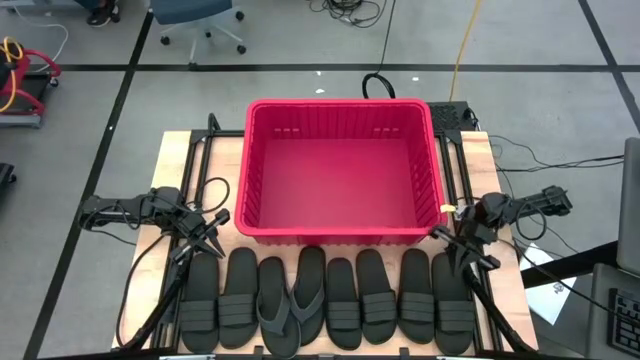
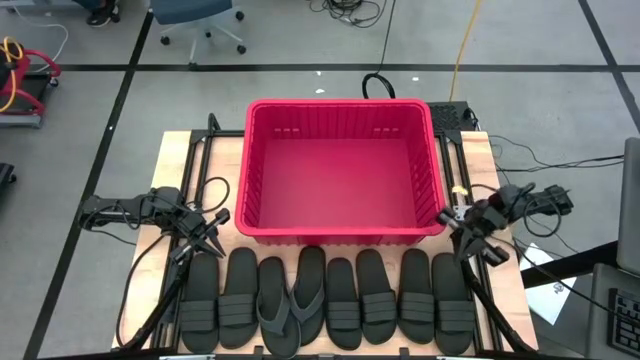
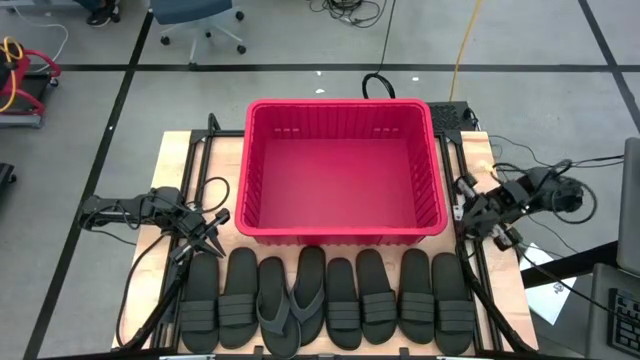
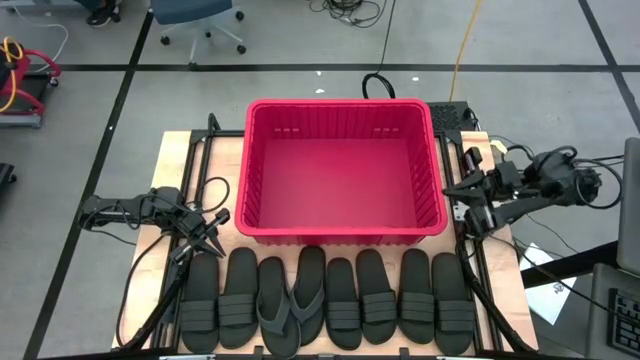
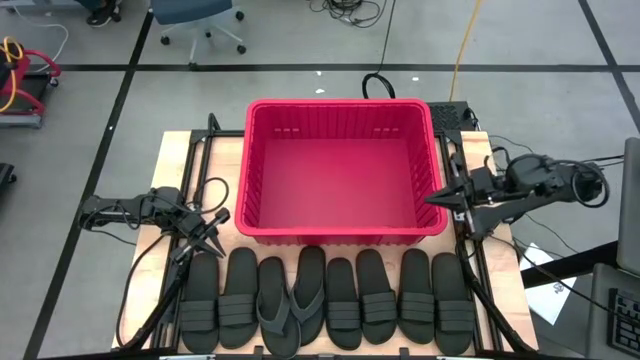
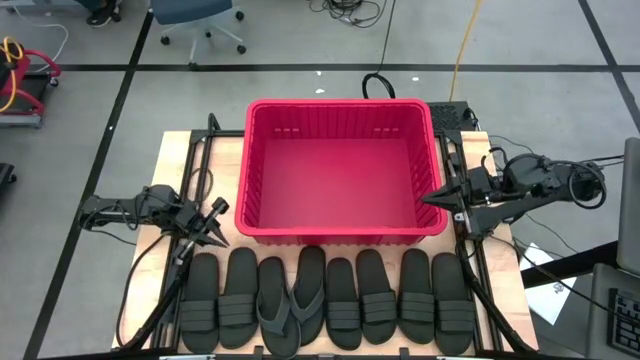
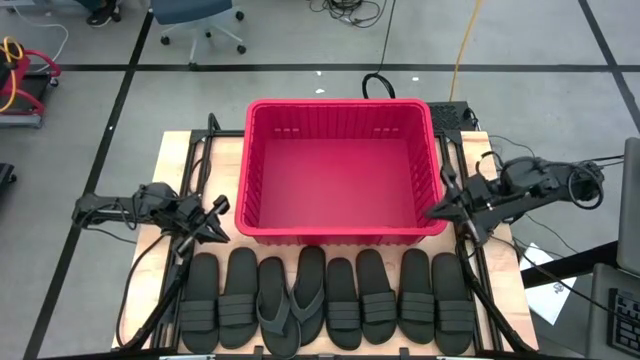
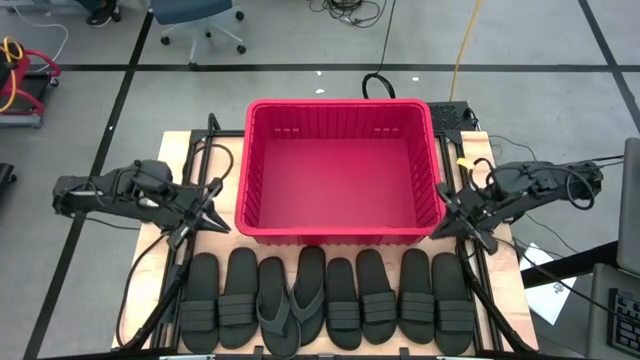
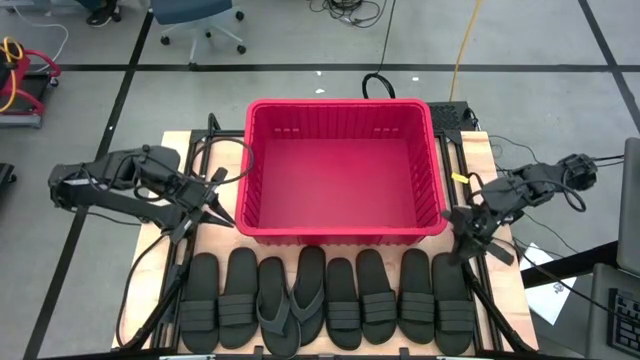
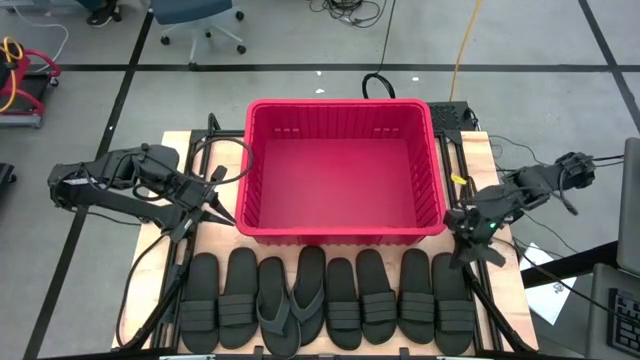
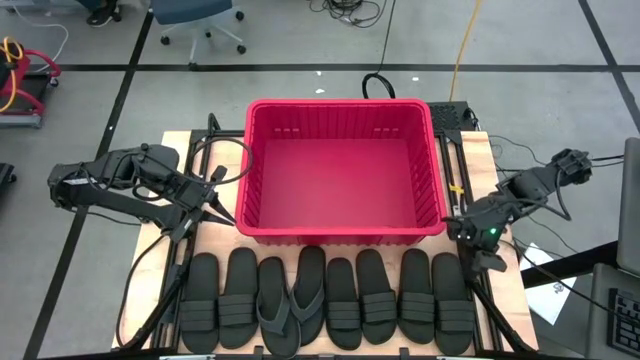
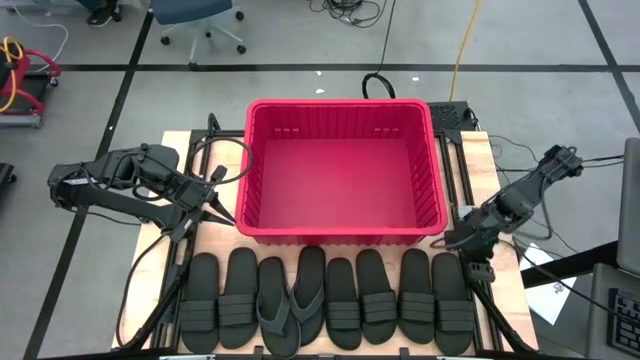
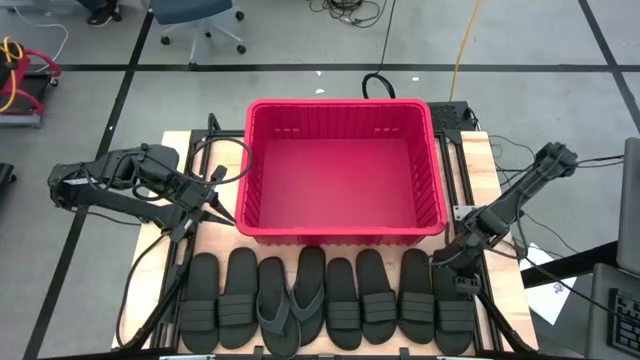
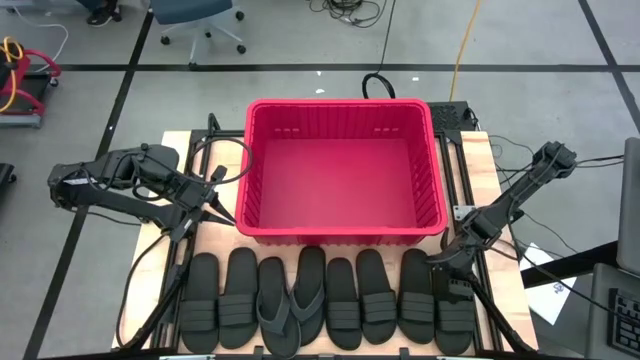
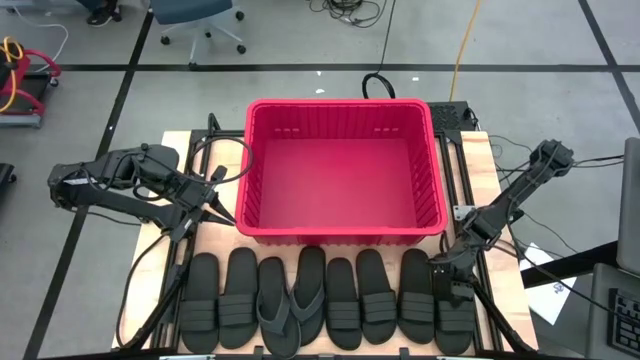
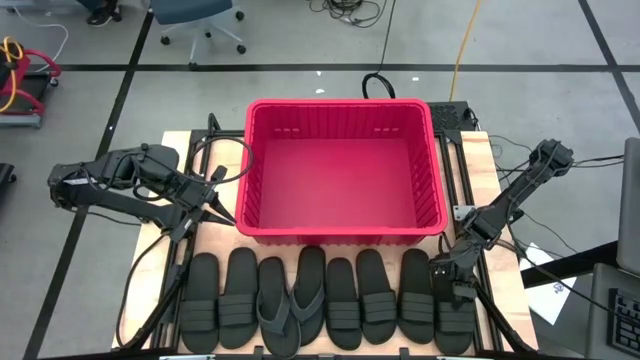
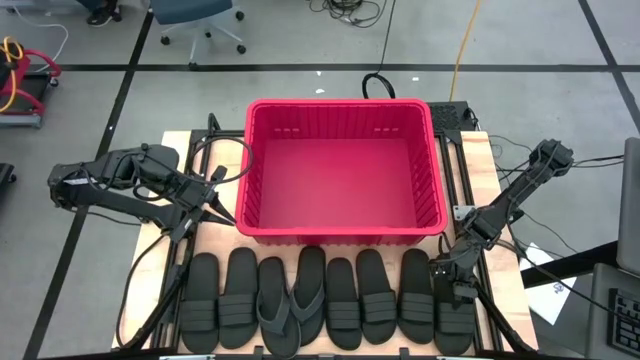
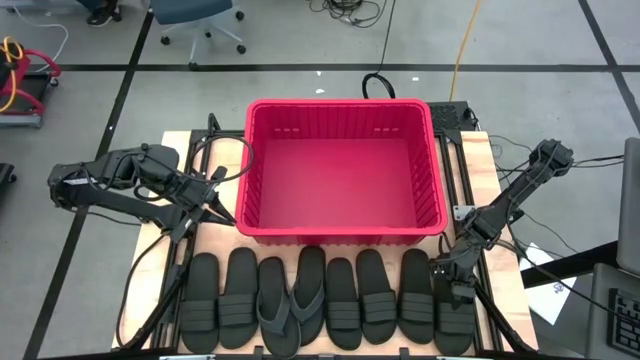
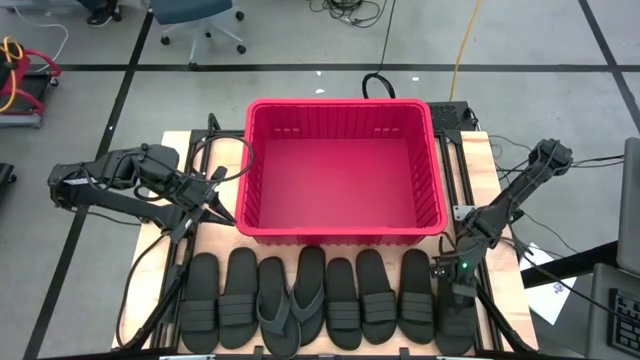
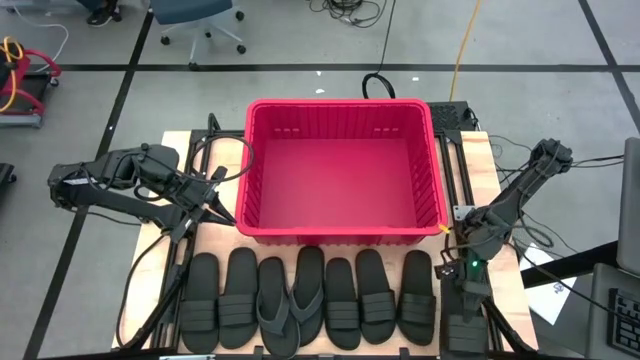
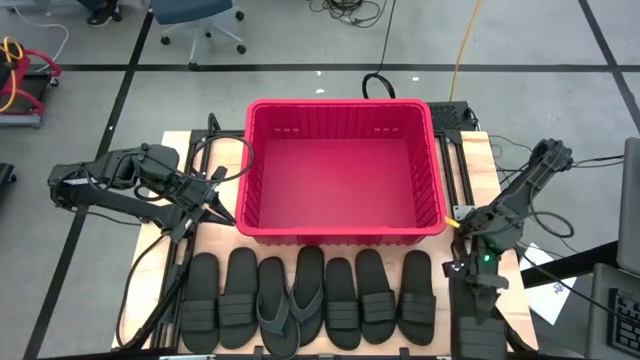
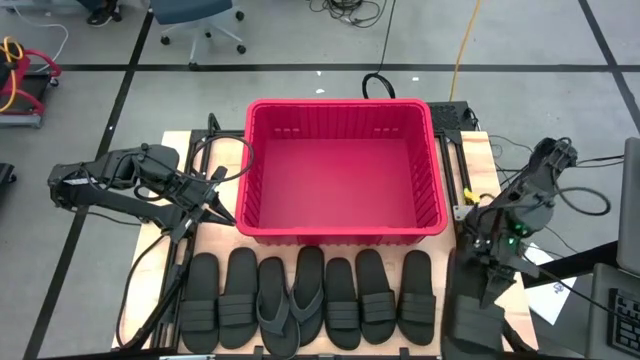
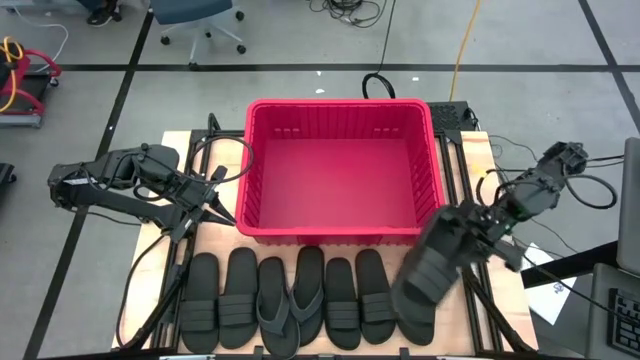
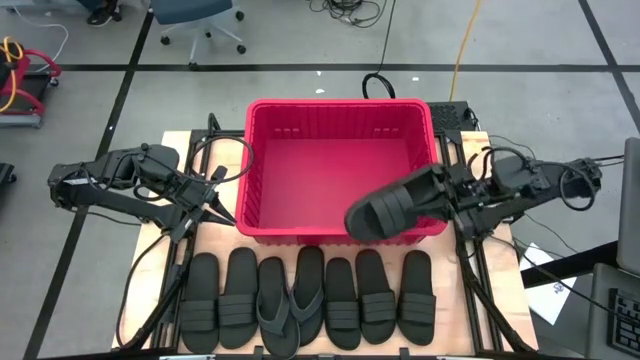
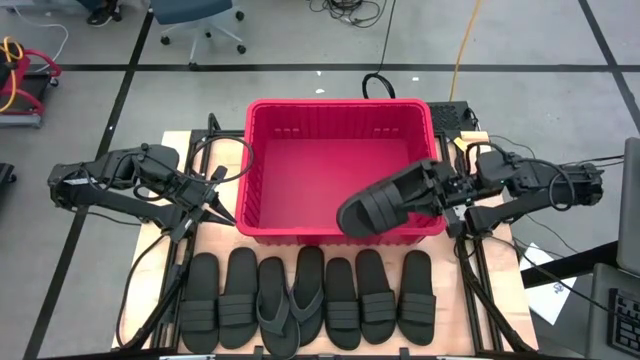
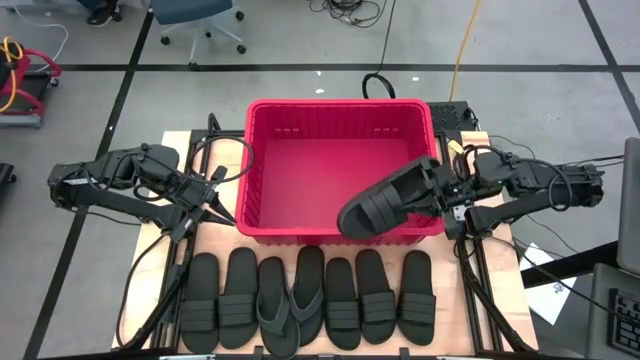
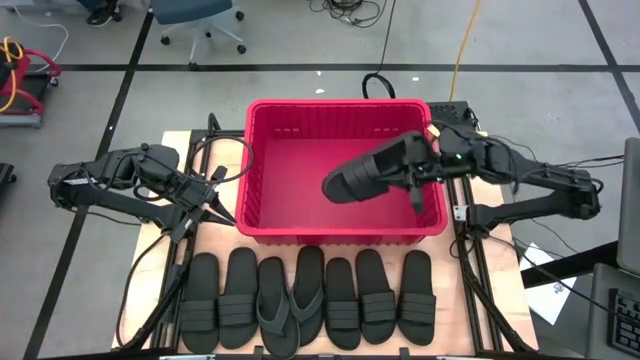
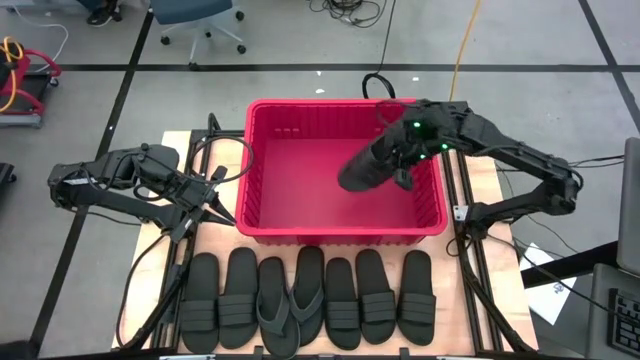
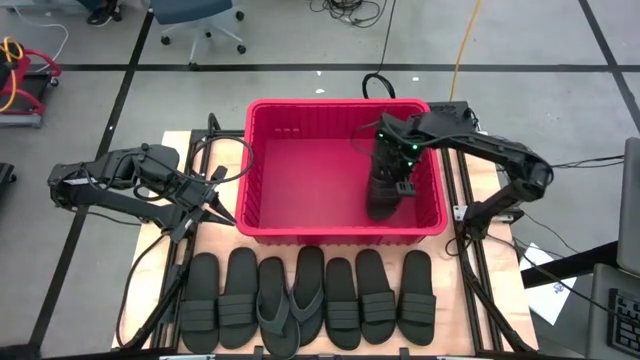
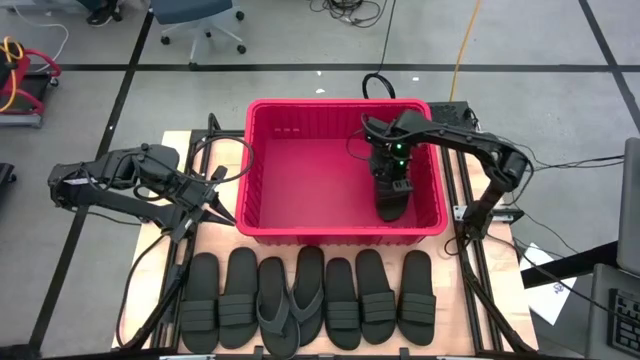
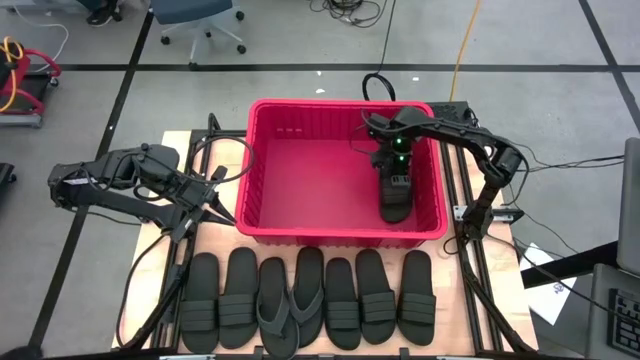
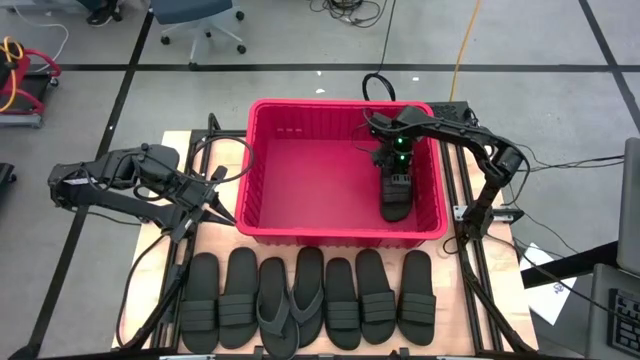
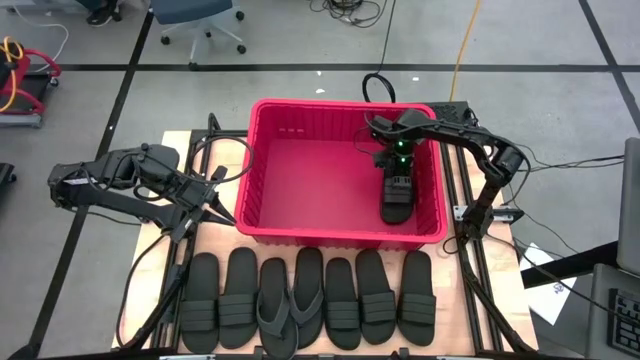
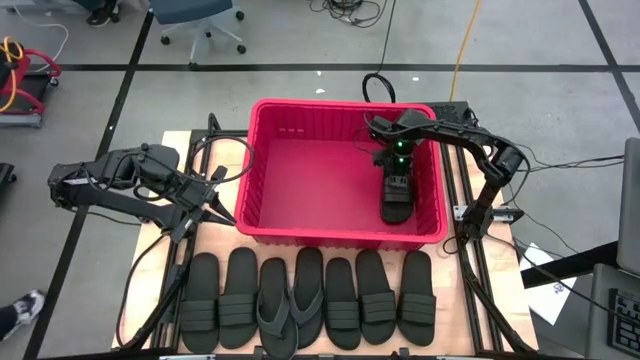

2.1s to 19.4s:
Task: Pick and place slides into bin
Put the black slide into the red bin

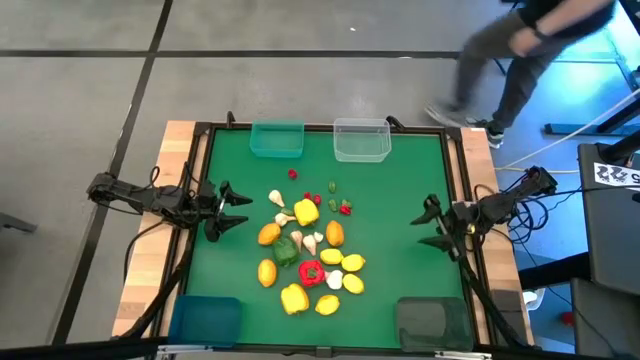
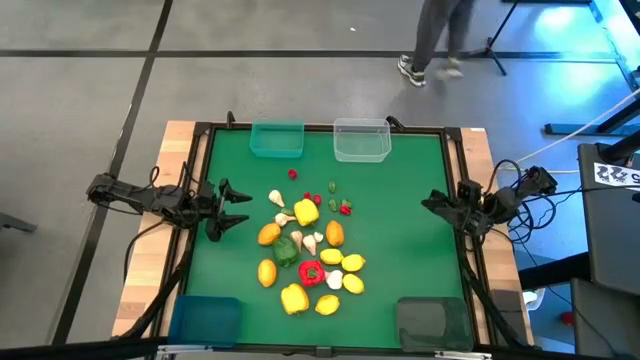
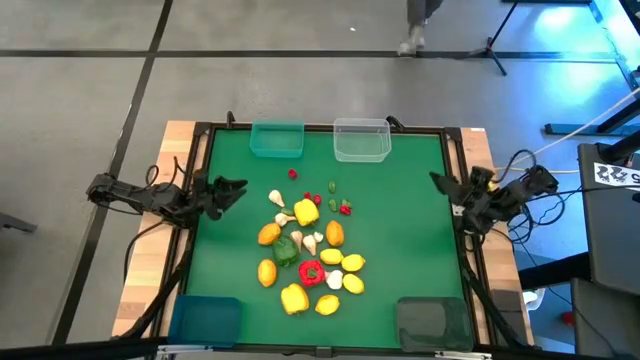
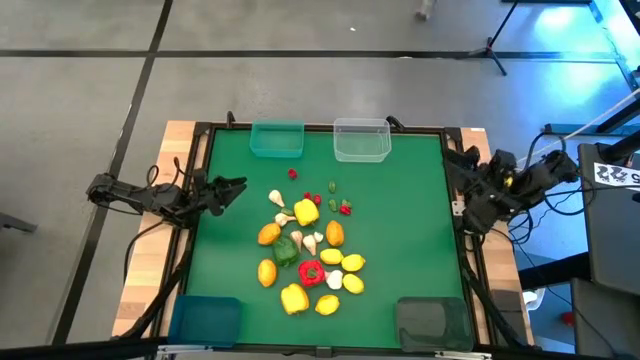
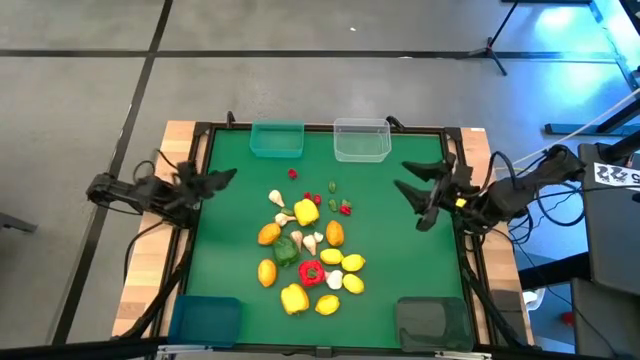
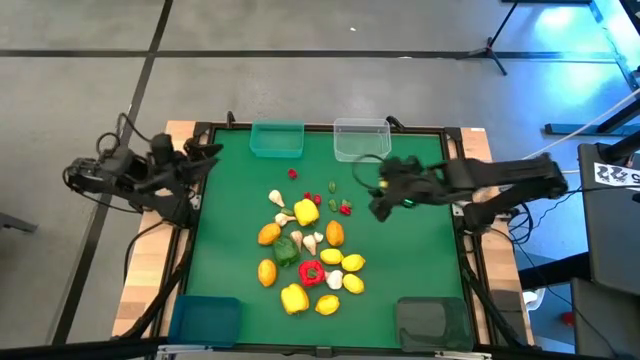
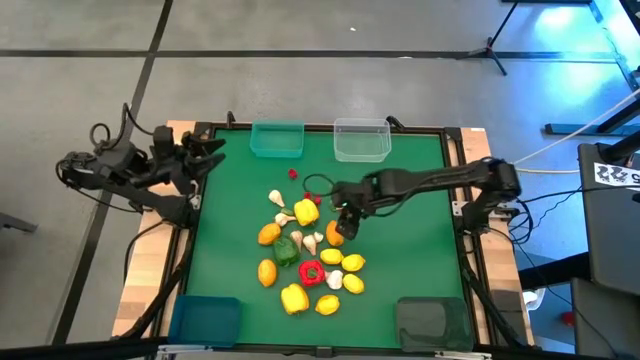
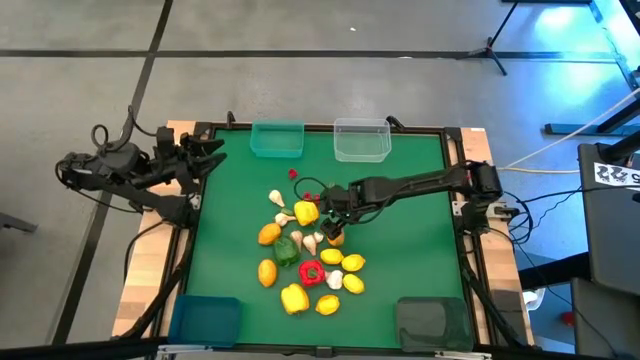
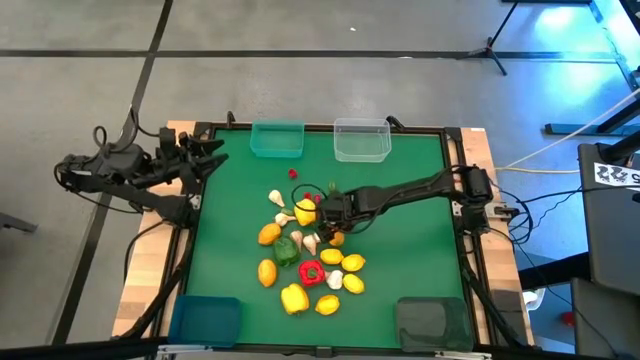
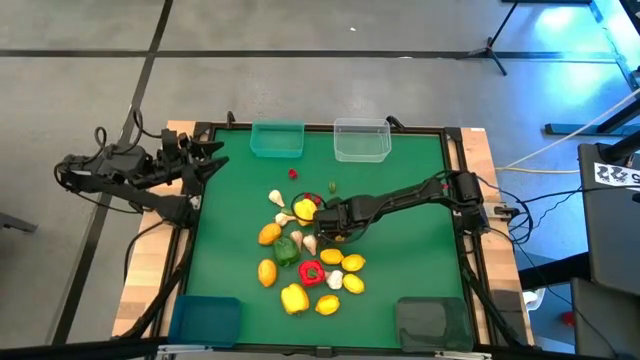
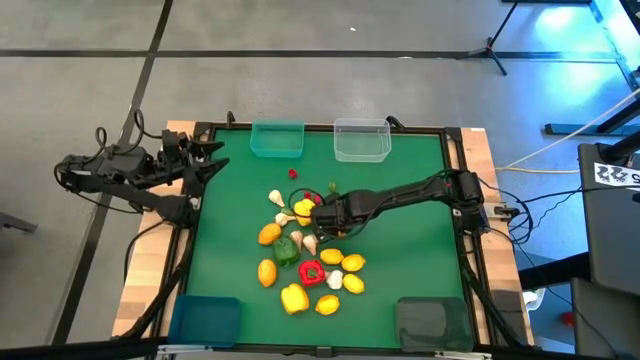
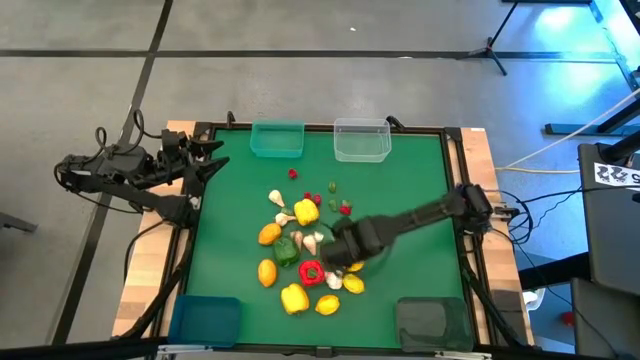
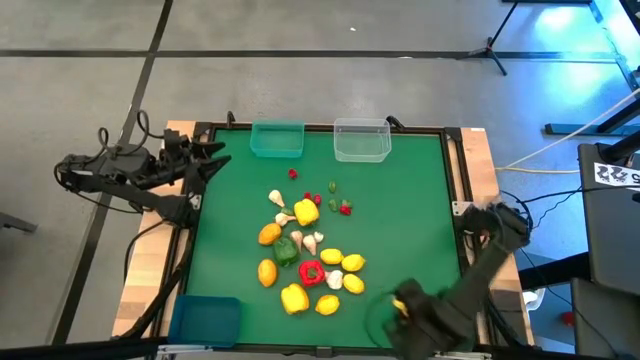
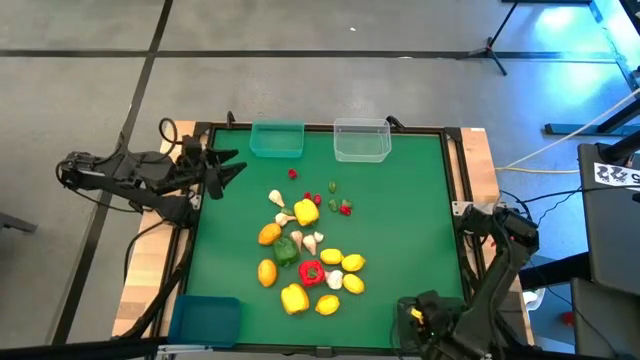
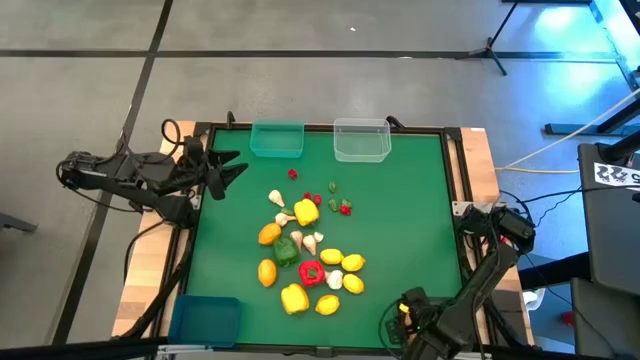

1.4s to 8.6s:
Task: Sort produce into baskets
Put the lemon into the black bin
